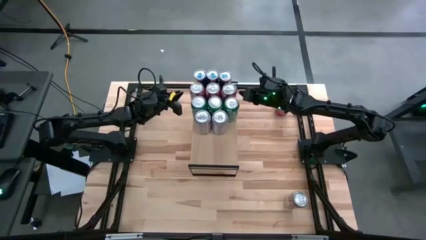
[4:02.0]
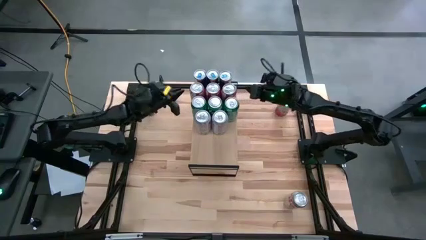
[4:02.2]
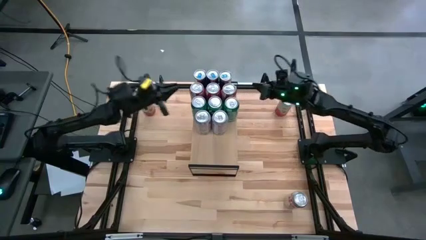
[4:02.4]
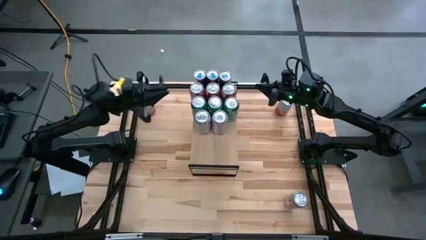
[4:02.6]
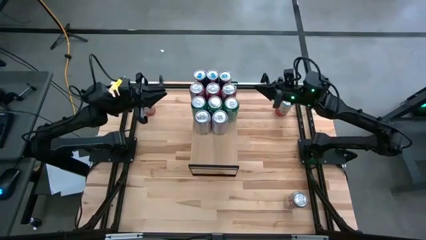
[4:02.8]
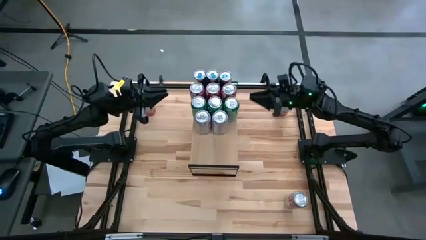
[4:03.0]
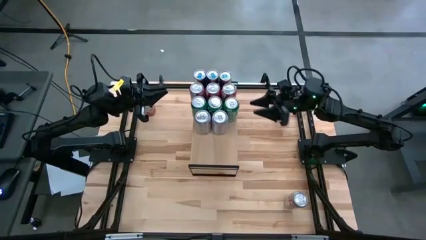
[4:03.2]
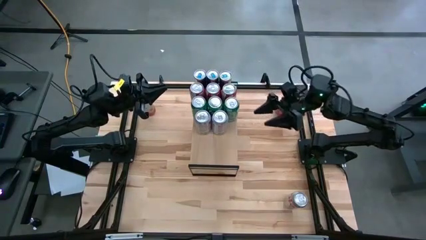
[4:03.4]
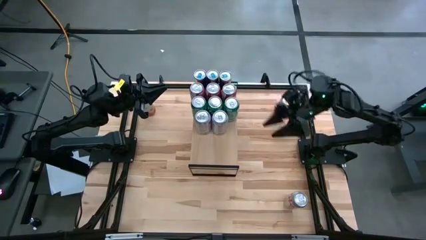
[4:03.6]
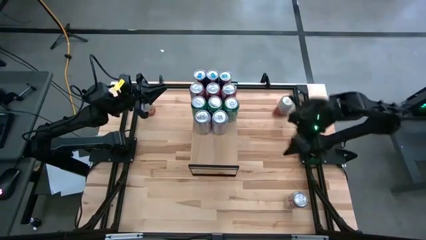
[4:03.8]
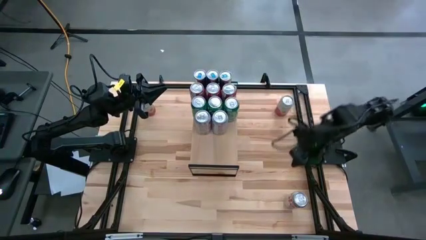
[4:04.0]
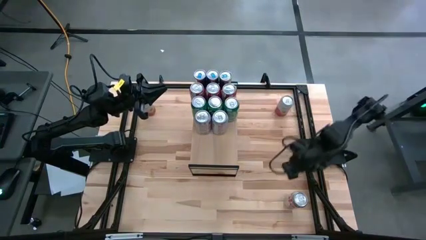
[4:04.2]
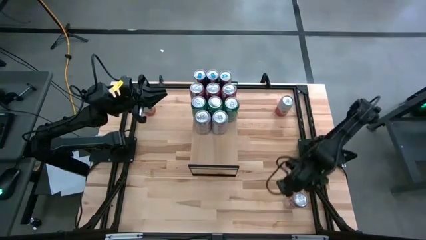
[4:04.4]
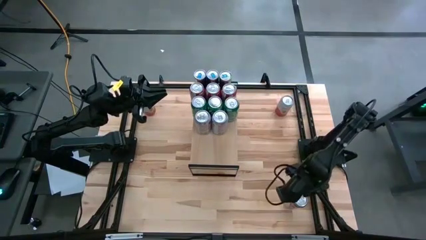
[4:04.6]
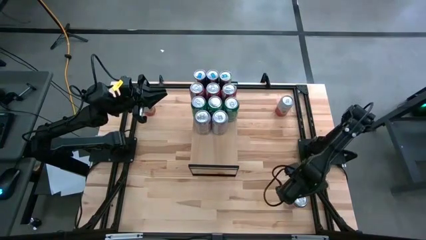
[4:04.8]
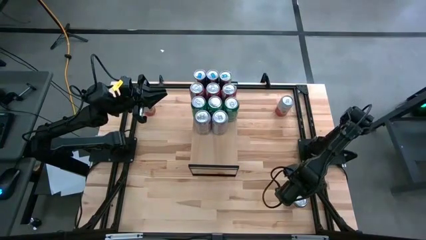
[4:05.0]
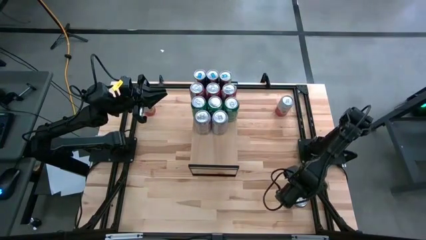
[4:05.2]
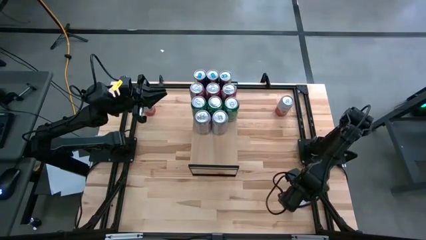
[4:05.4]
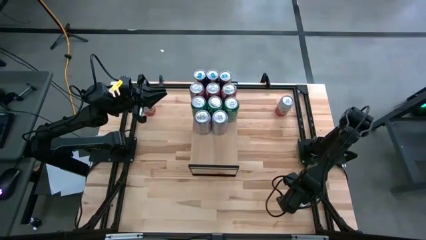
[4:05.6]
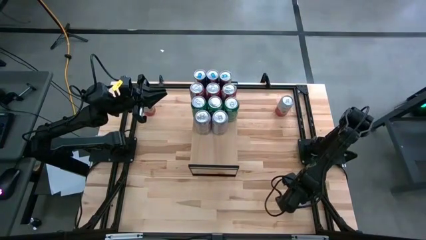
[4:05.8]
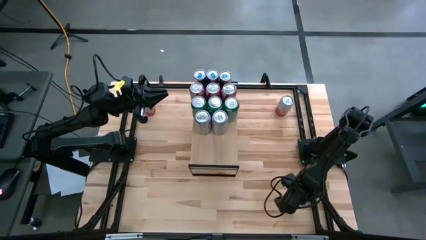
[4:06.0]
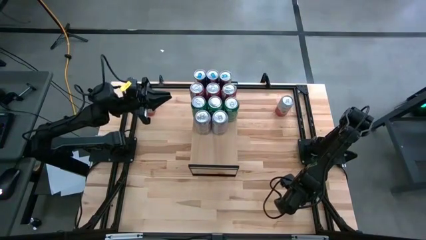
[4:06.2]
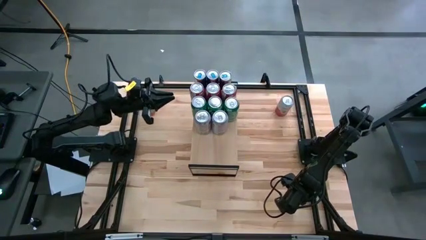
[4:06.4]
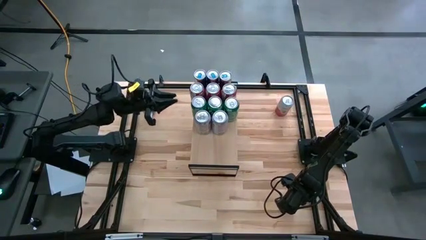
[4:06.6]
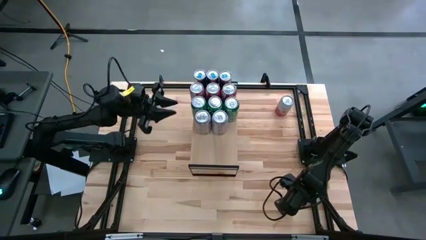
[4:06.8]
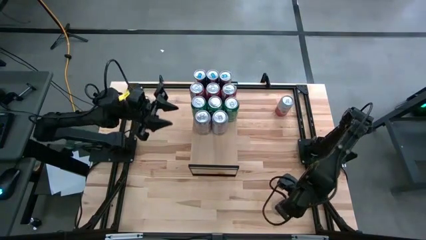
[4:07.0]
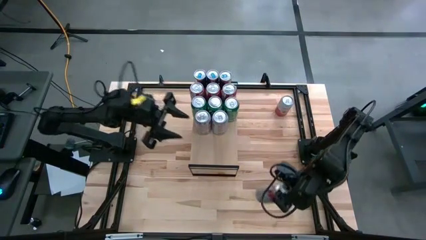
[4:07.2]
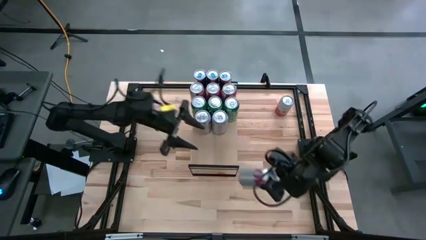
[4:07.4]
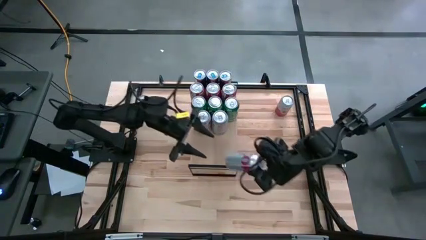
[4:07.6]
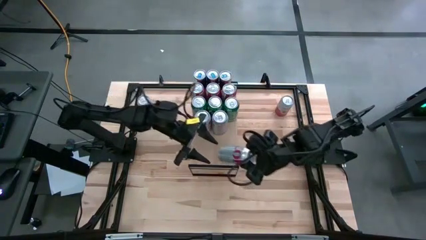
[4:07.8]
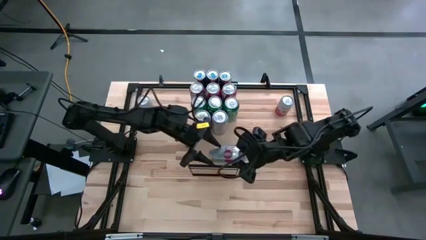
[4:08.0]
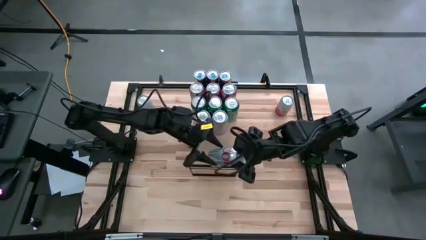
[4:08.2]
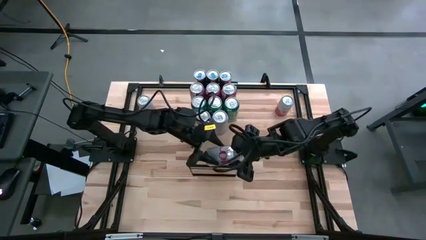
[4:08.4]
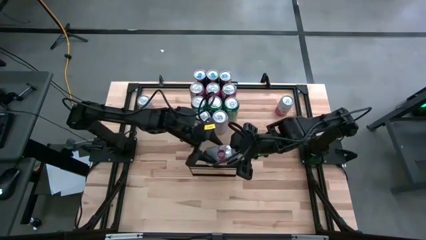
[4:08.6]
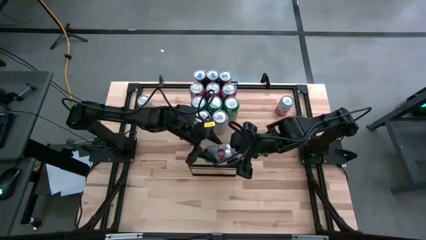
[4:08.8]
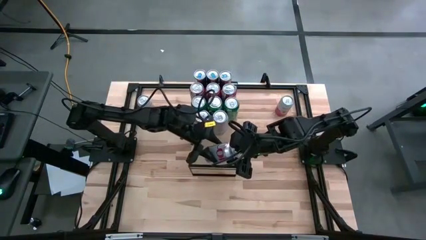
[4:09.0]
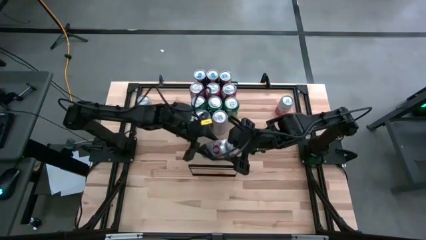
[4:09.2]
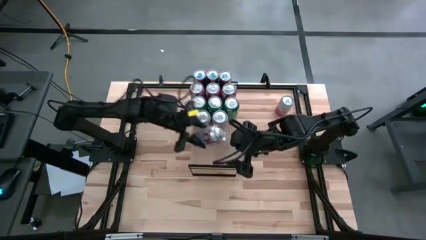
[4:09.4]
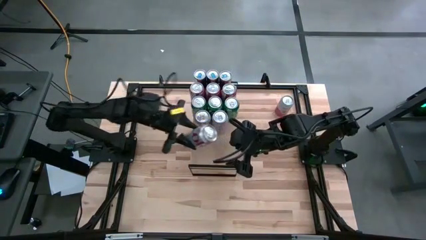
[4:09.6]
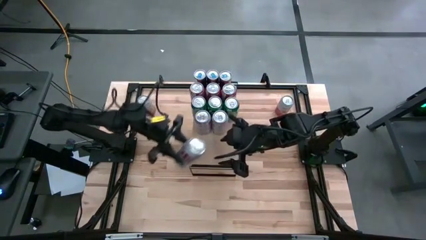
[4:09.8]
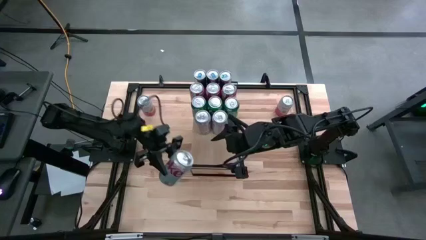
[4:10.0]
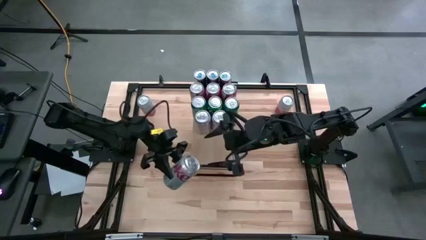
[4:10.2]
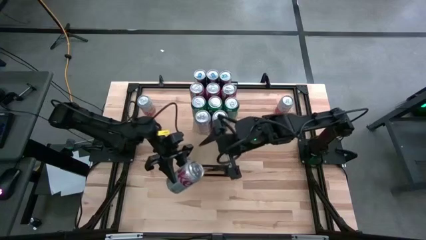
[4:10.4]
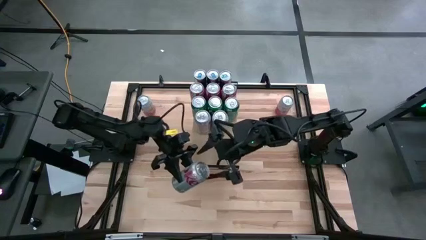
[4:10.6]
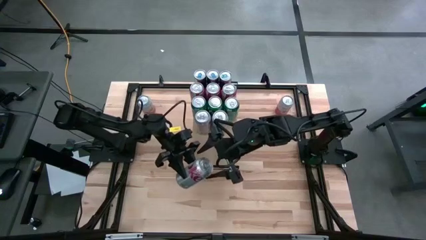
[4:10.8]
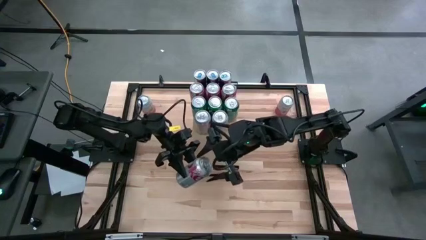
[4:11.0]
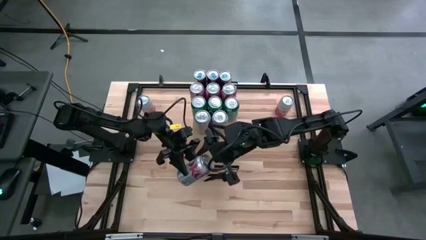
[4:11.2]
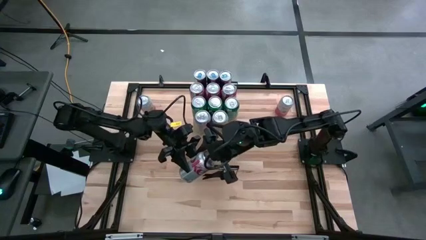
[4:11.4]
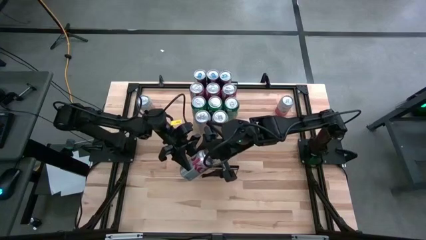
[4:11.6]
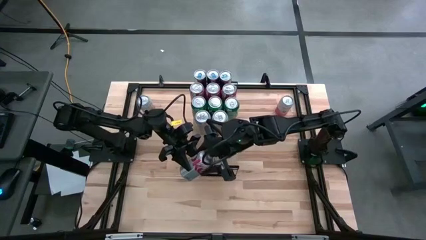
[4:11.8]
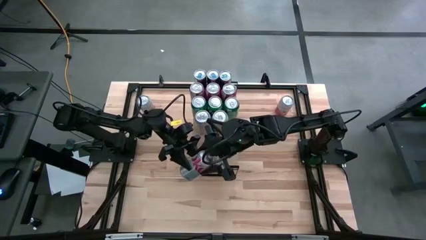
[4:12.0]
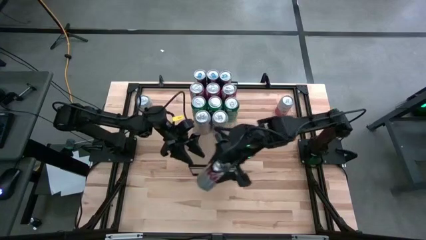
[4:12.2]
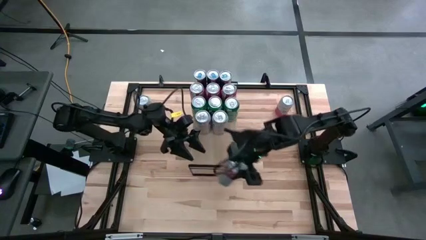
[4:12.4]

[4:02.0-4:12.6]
Task: Place canned beverage on shelf
Put the red silver soda can on the shelf

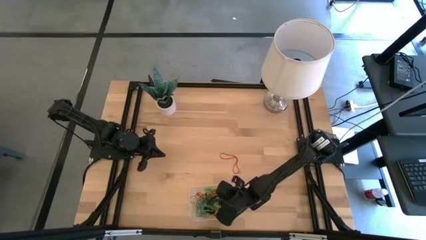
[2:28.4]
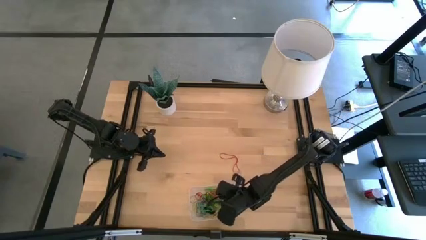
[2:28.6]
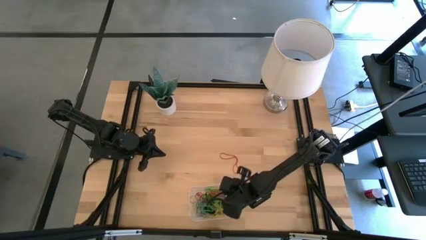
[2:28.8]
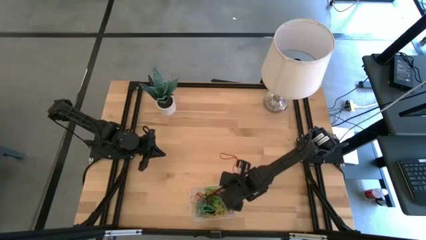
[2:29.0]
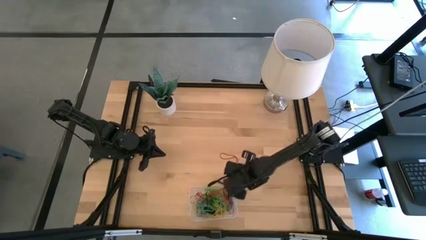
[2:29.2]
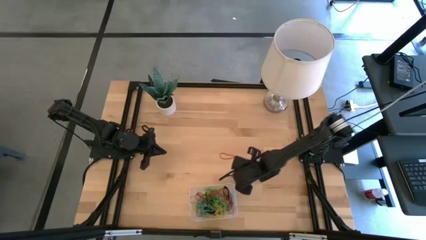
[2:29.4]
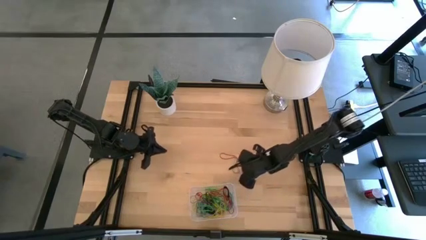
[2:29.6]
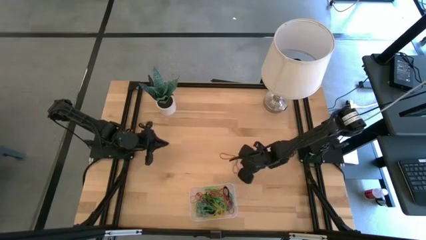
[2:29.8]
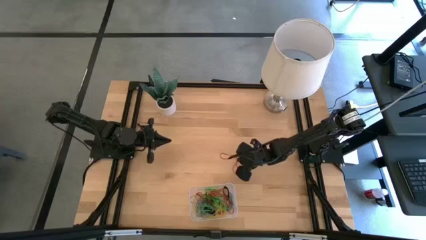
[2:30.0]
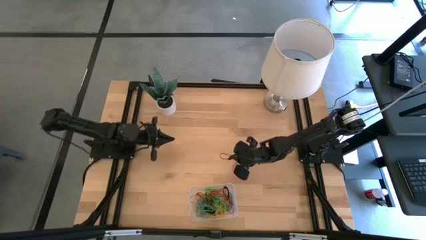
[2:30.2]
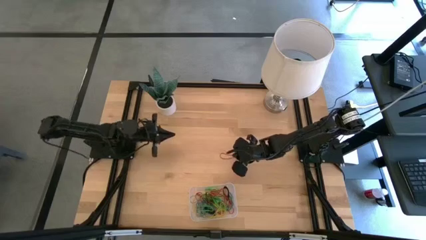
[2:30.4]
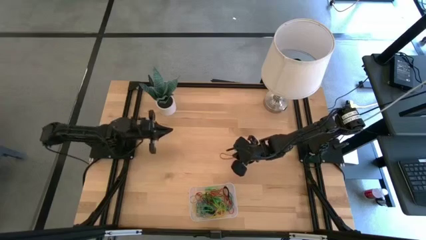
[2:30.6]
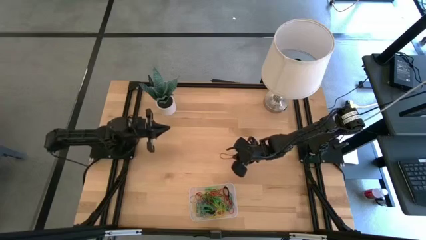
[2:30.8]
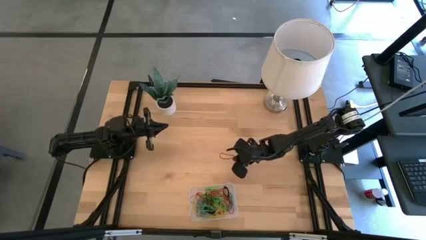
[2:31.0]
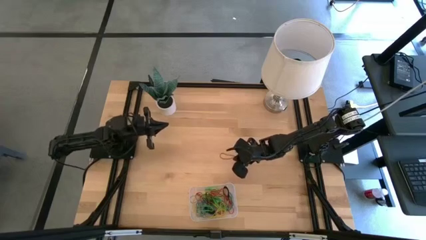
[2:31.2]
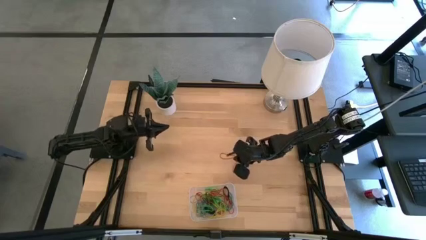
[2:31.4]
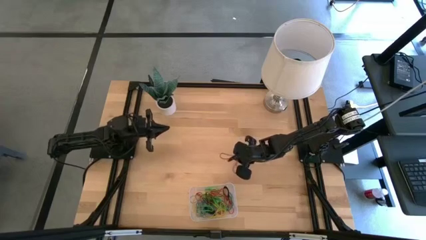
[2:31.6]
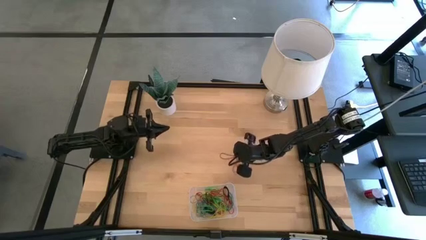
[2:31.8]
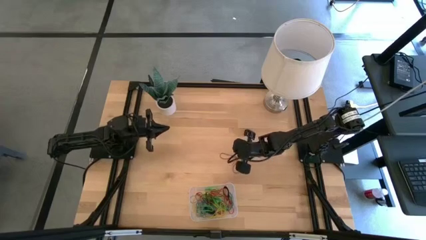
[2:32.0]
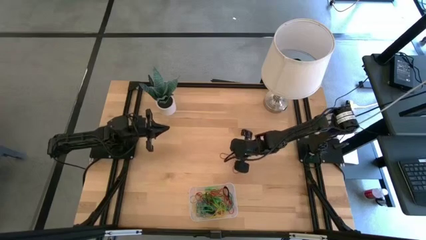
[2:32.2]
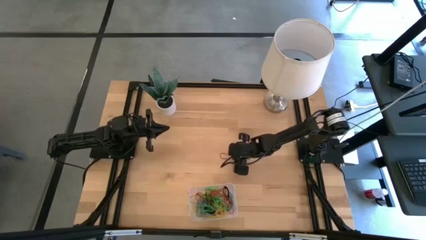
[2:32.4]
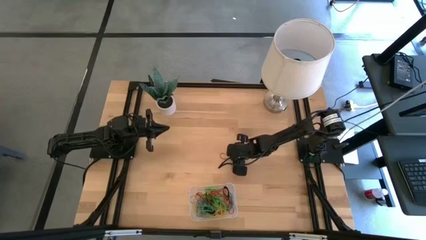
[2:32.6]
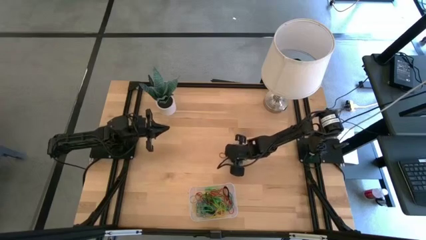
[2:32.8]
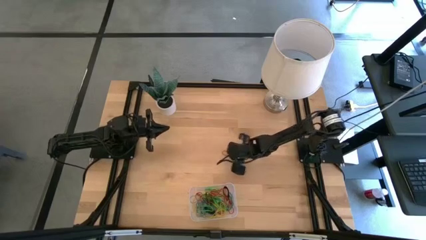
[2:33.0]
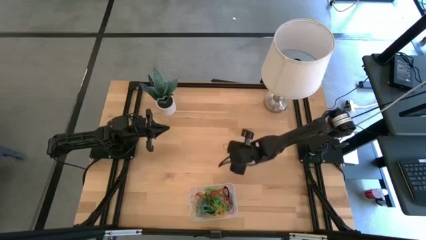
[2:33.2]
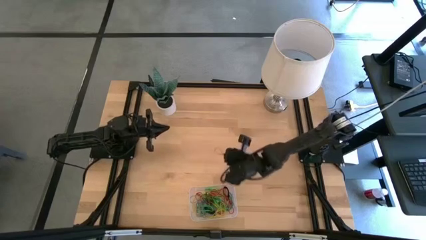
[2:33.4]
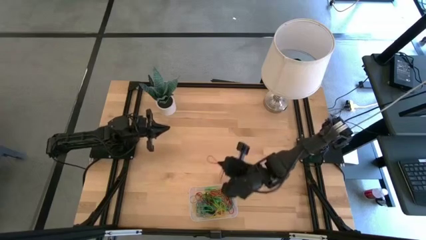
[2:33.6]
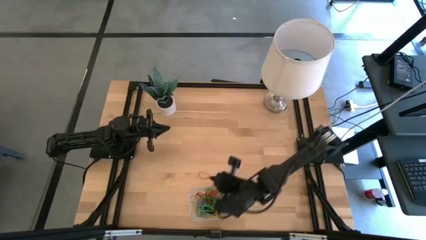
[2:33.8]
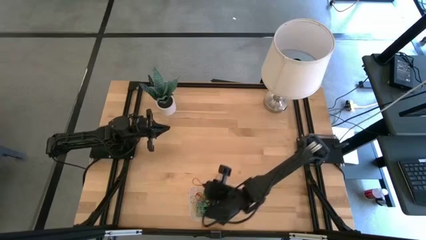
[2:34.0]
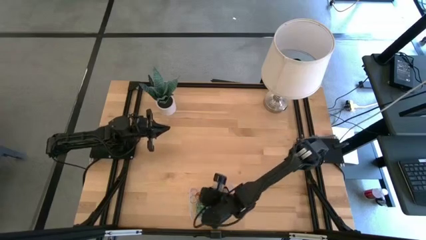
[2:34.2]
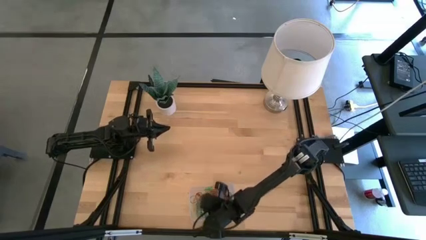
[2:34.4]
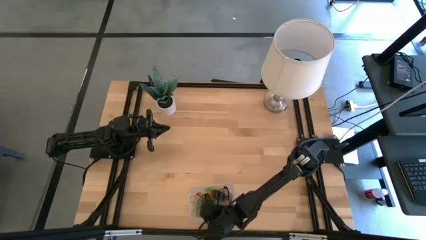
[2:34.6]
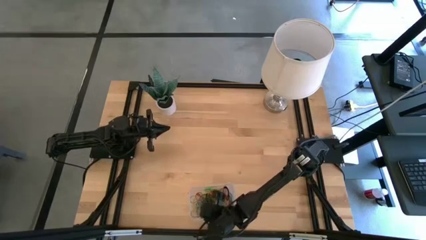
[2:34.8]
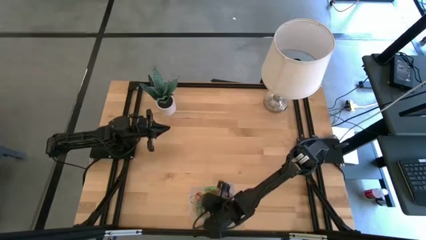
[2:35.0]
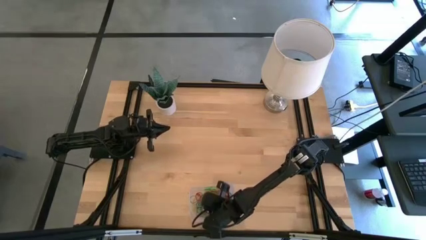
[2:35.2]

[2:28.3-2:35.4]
Task: Pick and place rubber bands into bin
Put the red rubber band into the transparent bin
